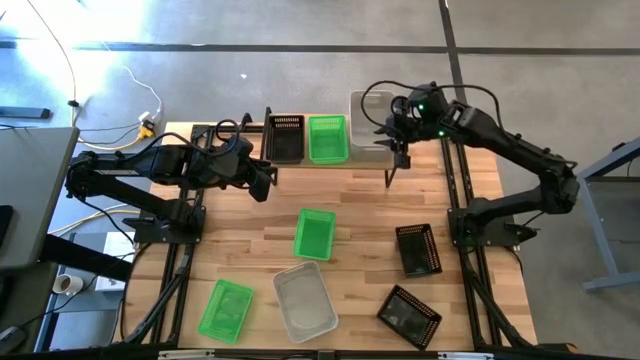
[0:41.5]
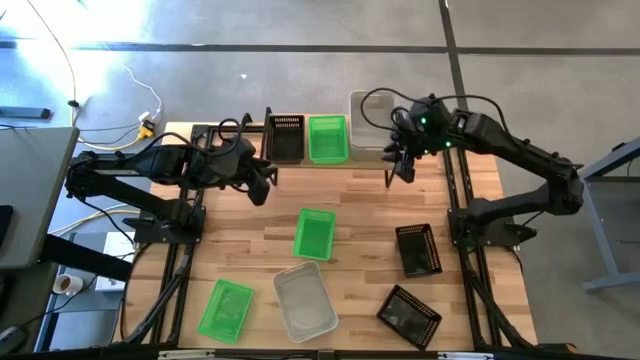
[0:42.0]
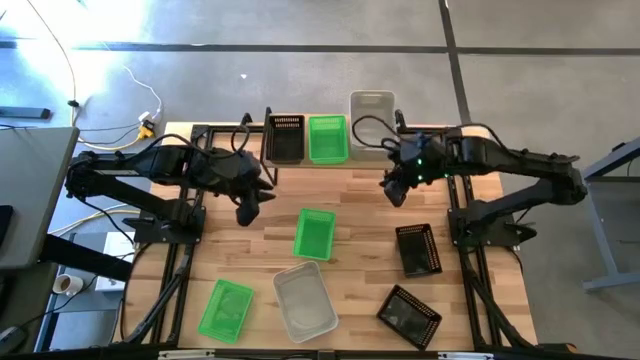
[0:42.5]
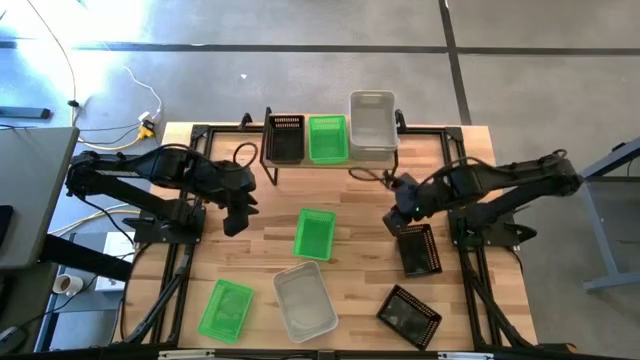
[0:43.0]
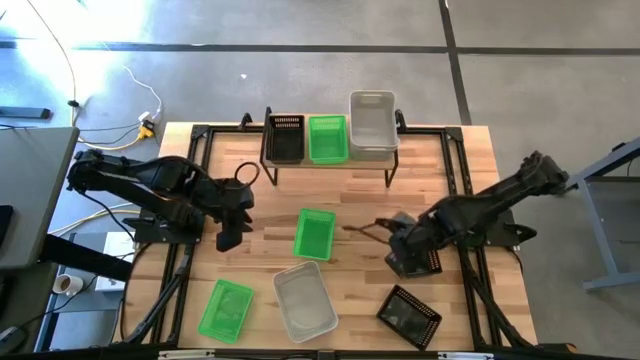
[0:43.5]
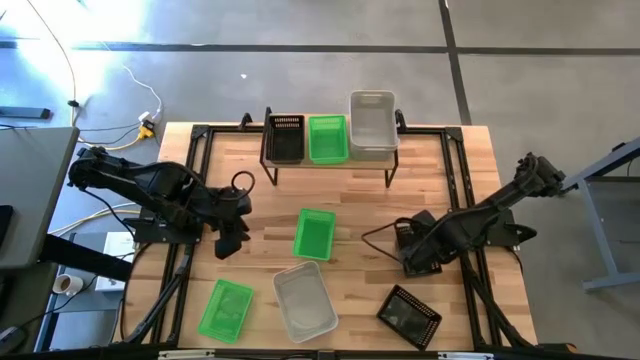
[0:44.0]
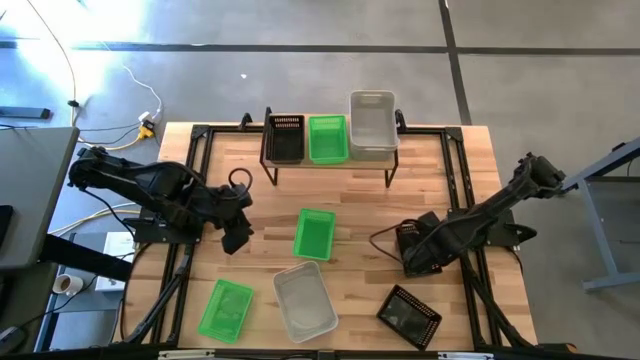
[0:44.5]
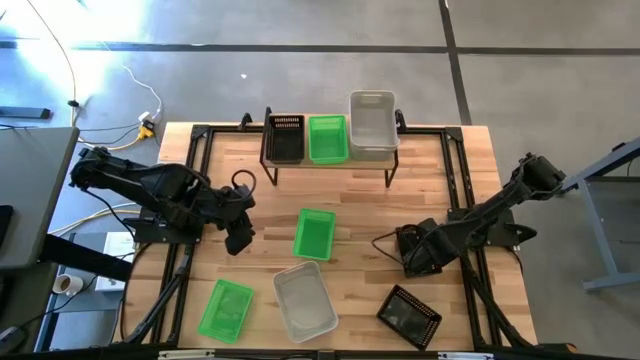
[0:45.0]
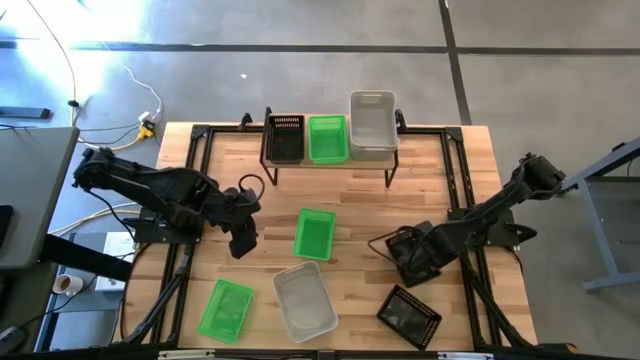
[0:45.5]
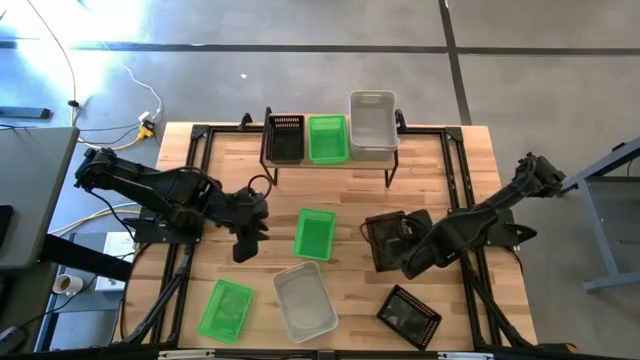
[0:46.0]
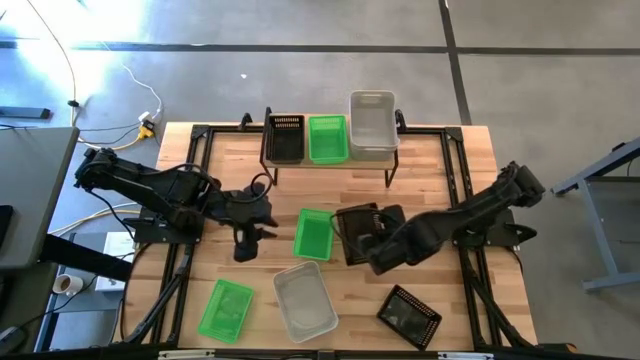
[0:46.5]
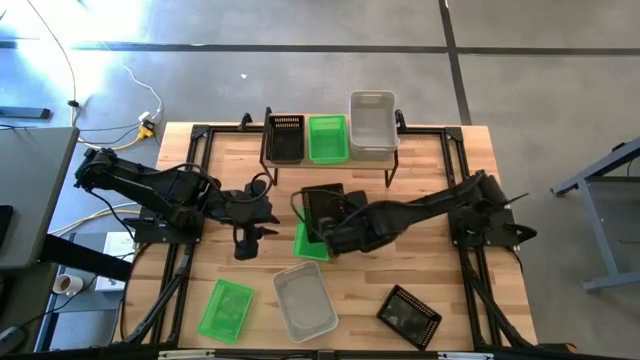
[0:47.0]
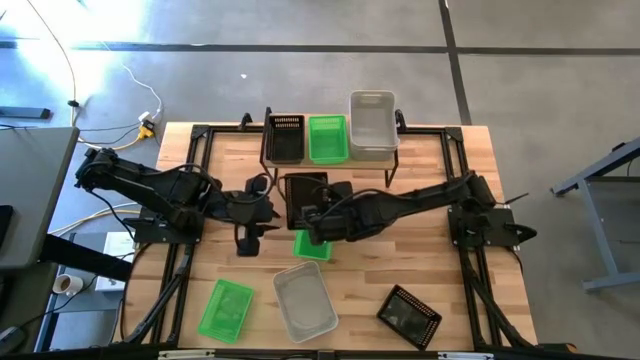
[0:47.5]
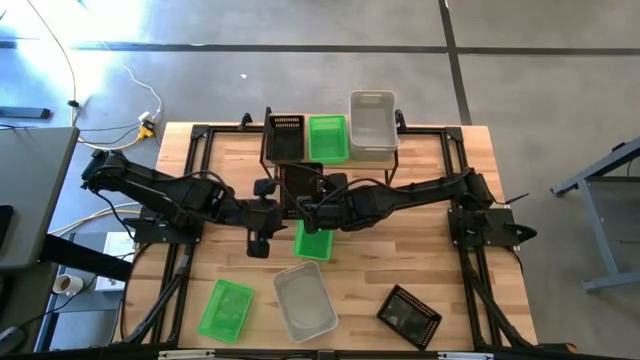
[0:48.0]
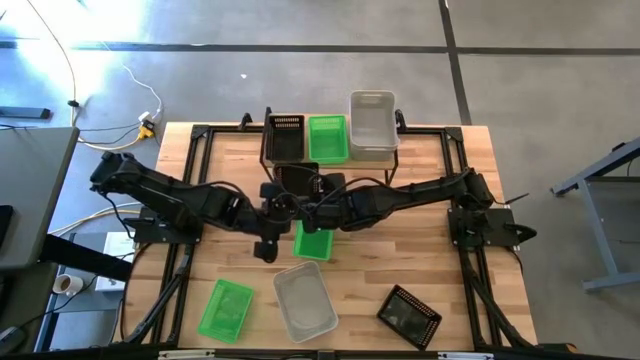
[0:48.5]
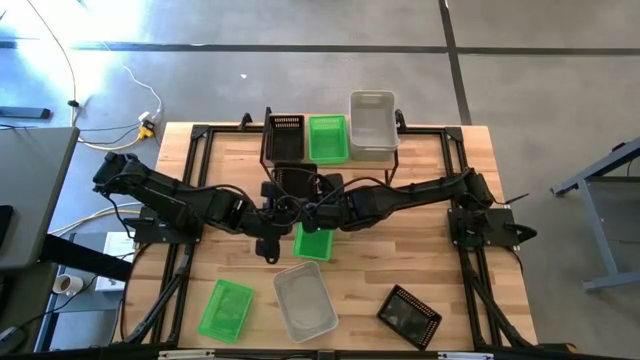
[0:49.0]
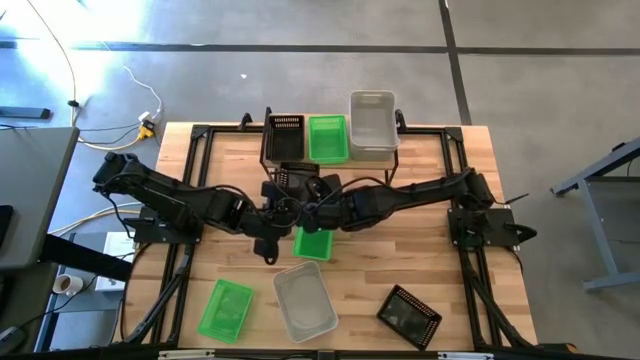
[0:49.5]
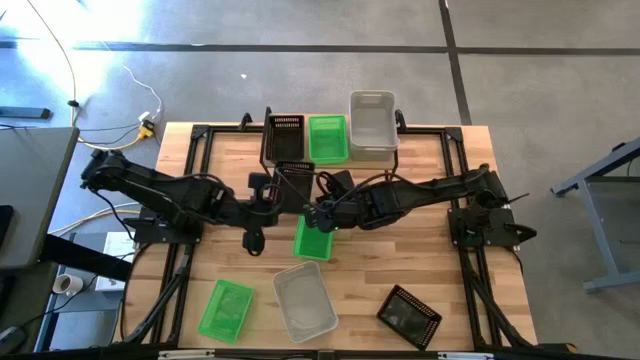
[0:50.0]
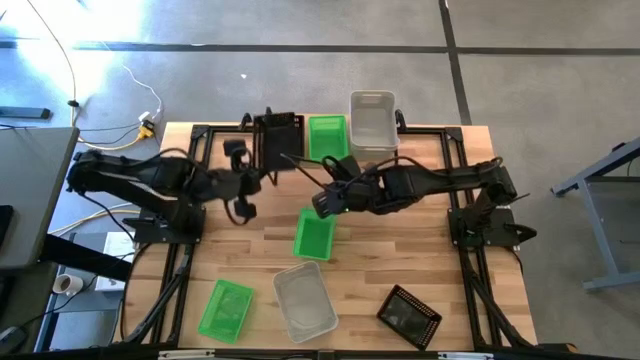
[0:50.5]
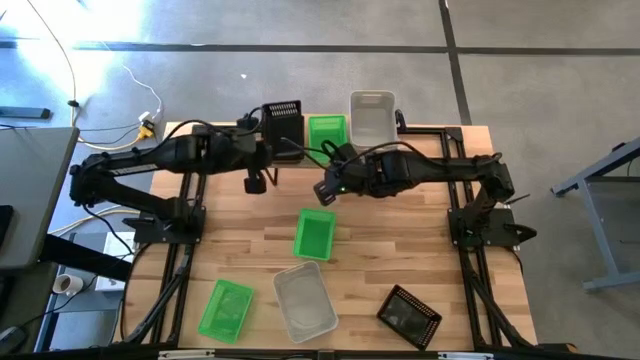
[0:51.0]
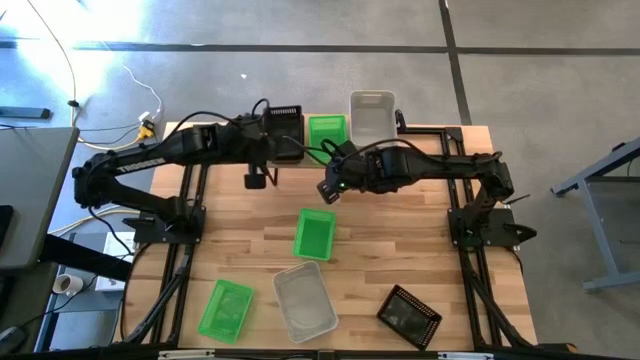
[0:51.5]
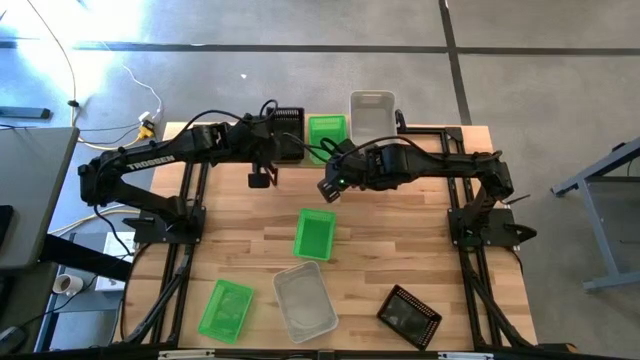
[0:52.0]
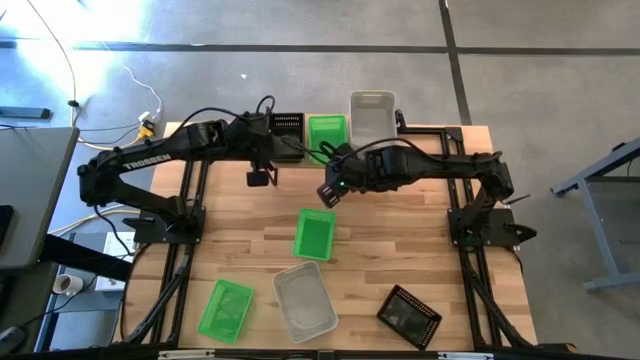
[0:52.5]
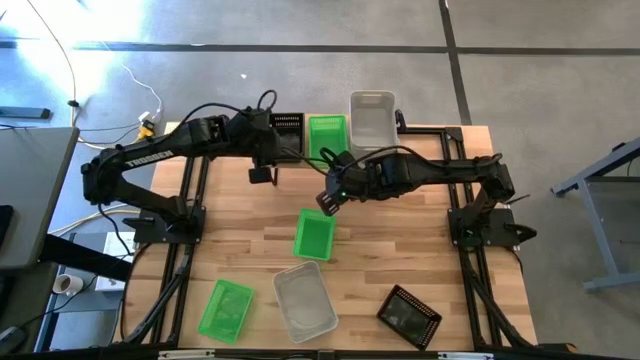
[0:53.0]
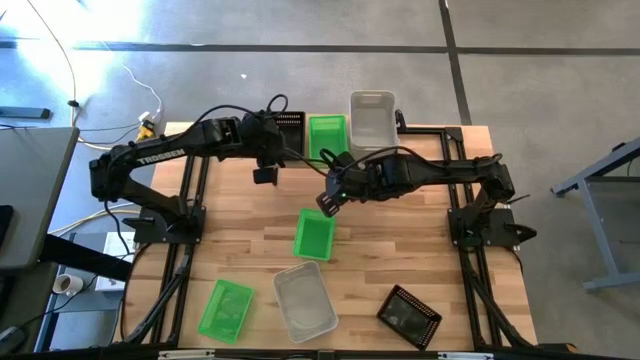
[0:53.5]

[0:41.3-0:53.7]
Task: Stack baskets on shelf by color
Stack the top black bin on top of the black bin on the shelf

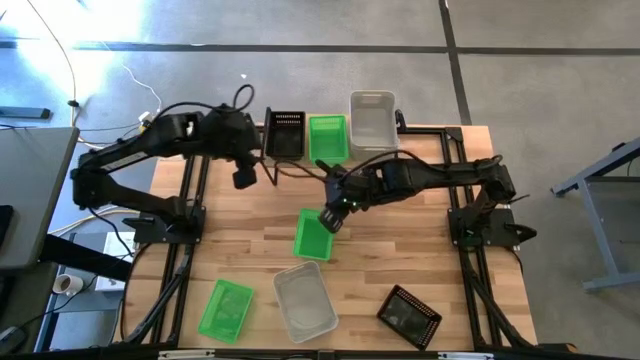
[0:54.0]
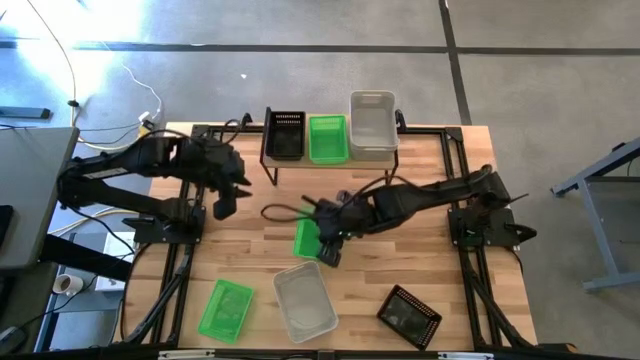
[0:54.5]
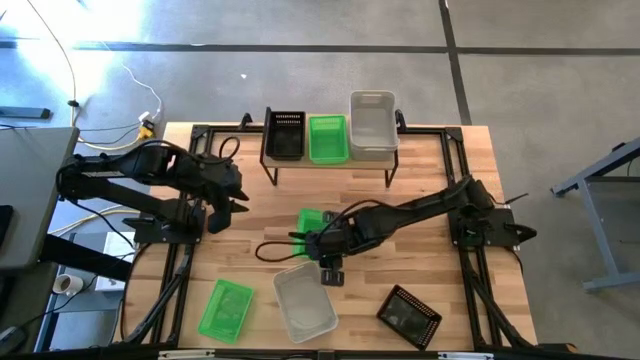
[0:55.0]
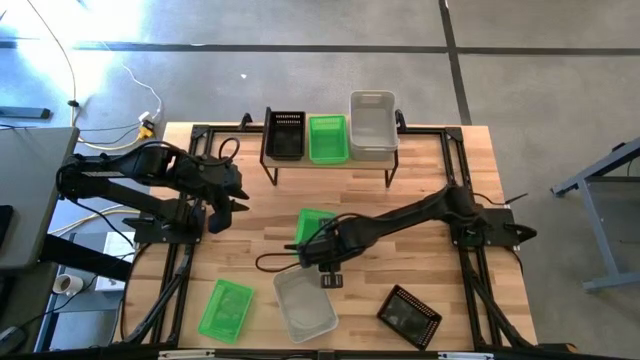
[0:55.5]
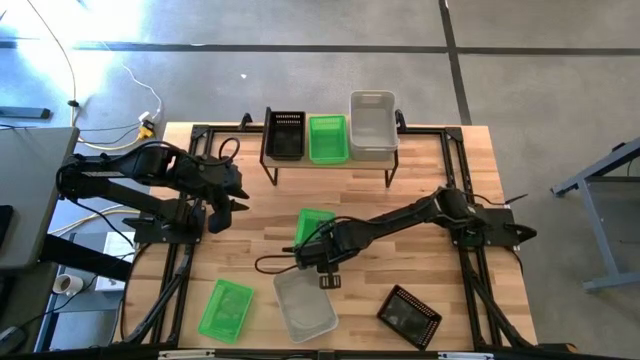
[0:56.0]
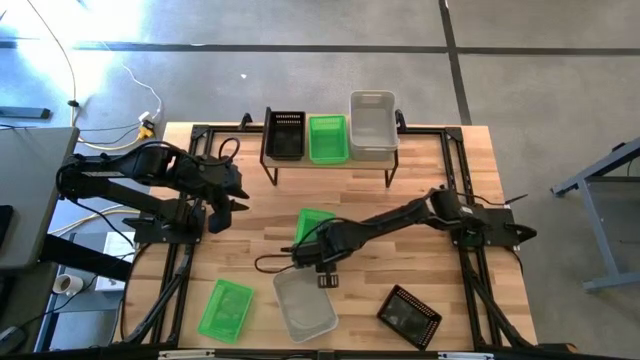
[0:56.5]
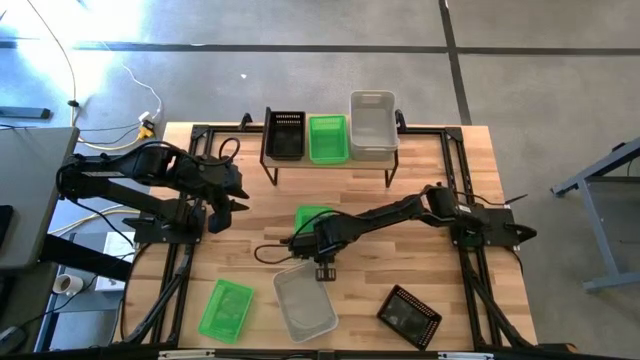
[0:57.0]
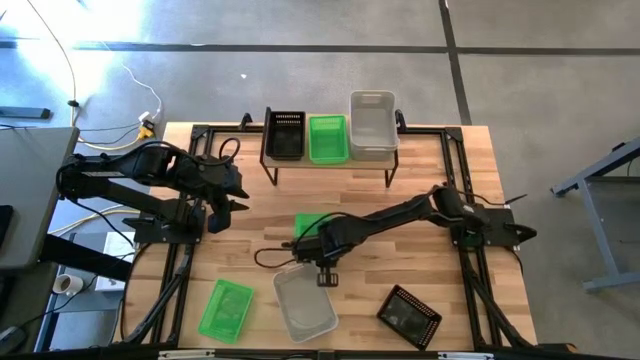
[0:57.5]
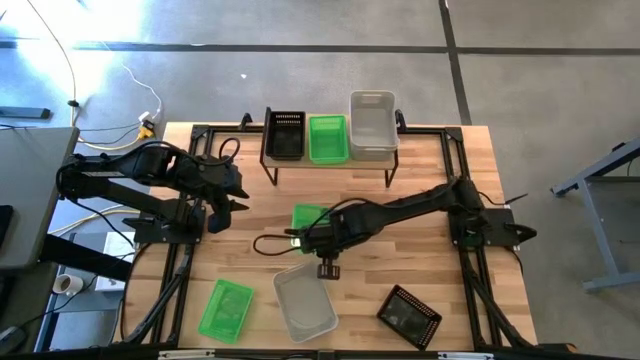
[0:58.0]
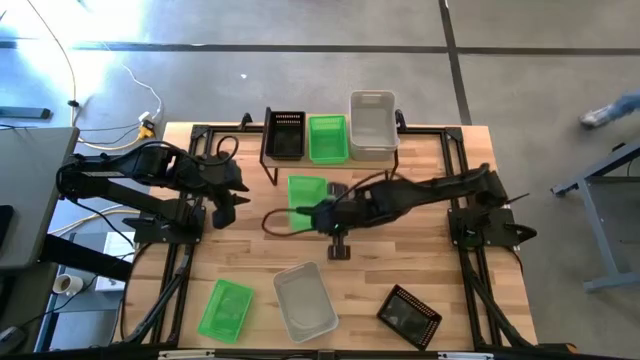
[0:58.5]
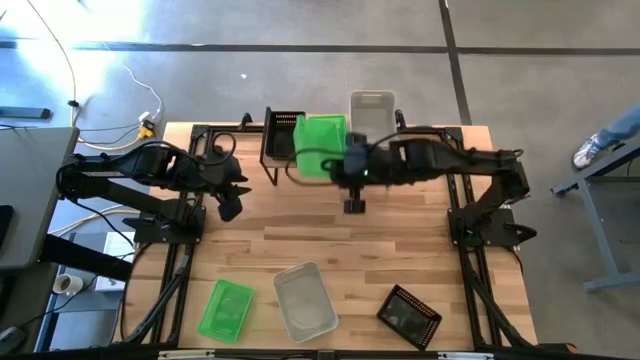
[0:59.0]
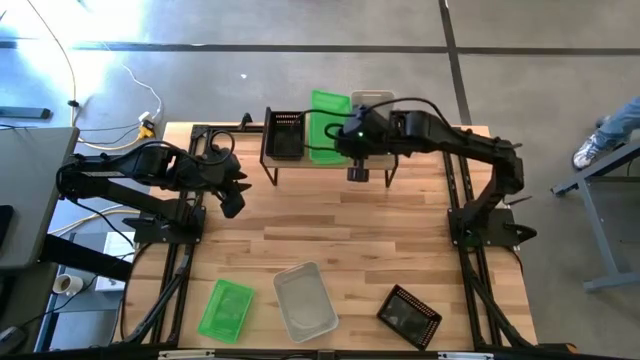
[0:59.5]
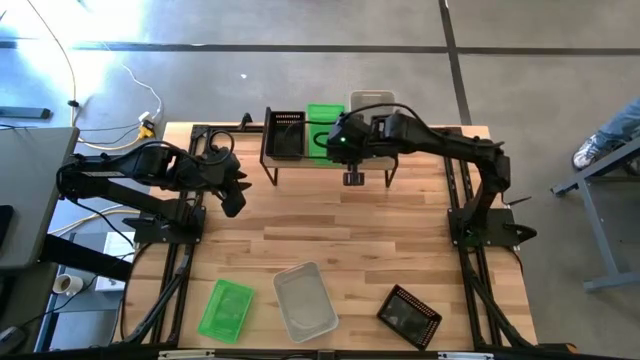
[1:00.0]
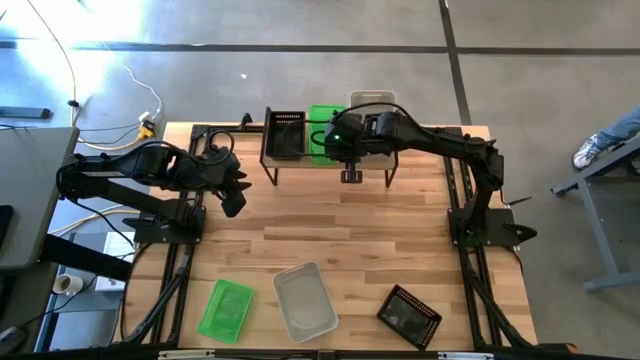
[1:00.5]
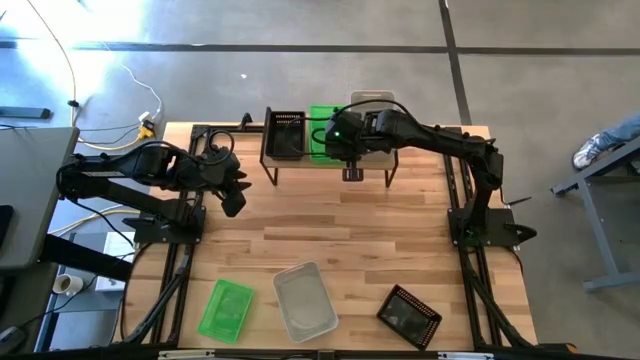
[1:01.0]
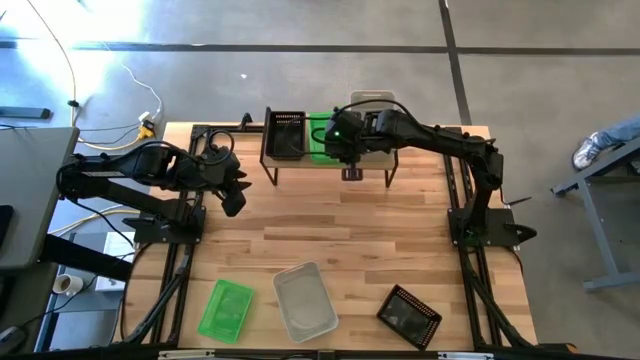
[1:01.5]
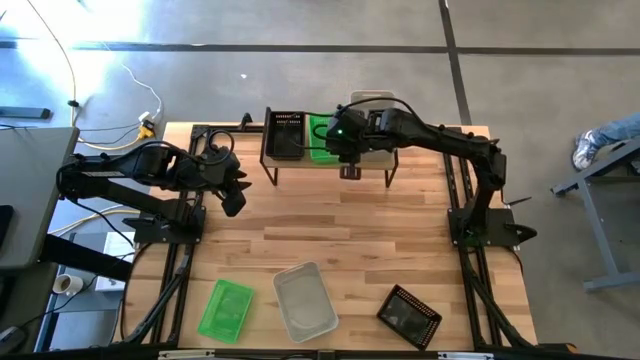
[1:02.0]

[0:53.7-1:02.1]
Stack the top green bin on top of the green bin on the shelf
